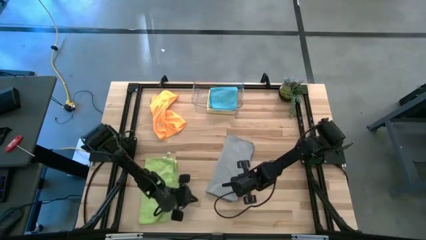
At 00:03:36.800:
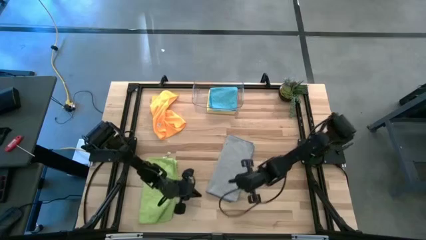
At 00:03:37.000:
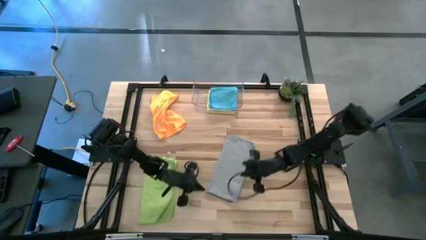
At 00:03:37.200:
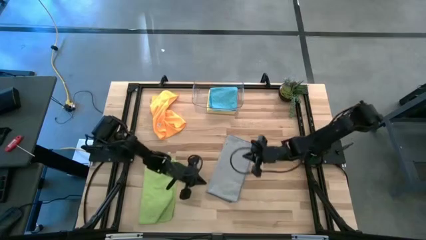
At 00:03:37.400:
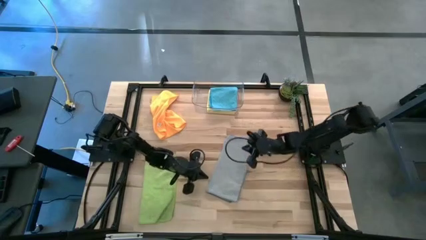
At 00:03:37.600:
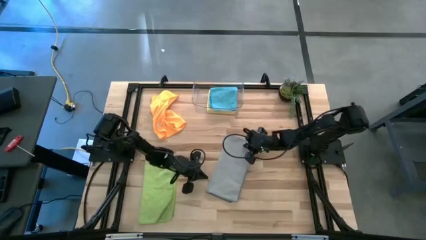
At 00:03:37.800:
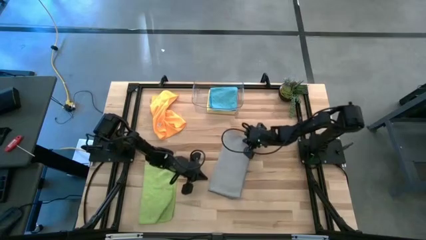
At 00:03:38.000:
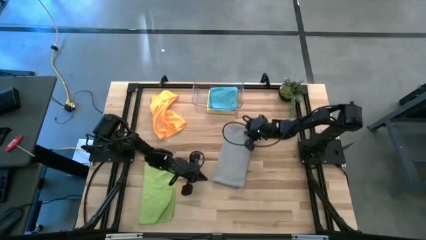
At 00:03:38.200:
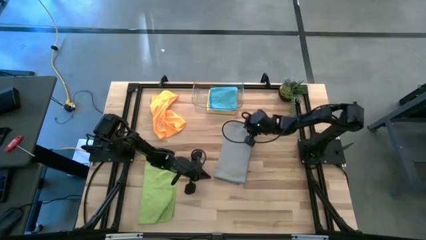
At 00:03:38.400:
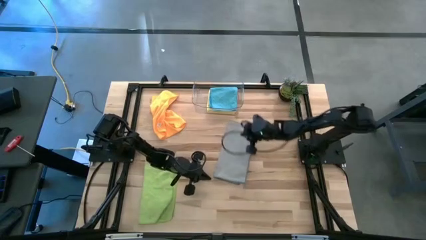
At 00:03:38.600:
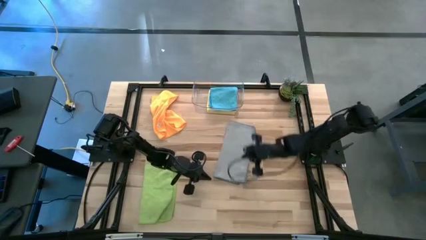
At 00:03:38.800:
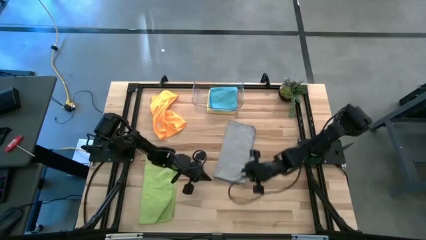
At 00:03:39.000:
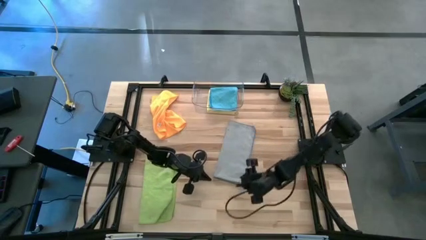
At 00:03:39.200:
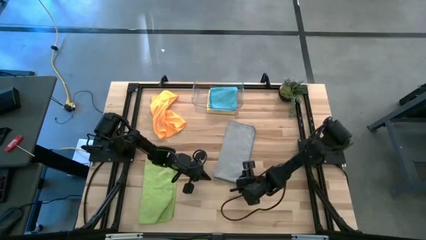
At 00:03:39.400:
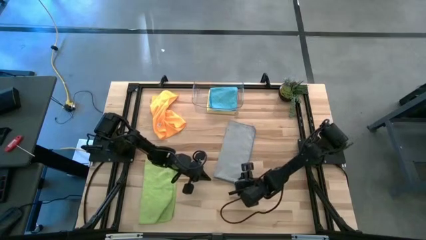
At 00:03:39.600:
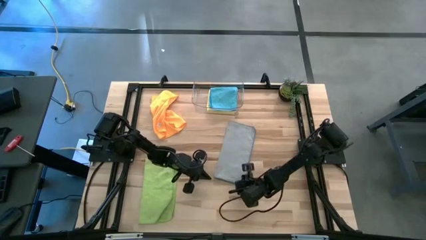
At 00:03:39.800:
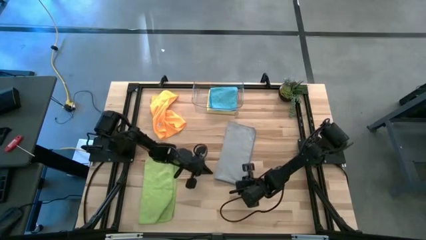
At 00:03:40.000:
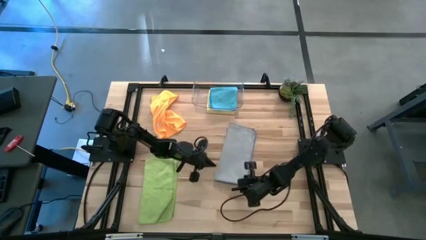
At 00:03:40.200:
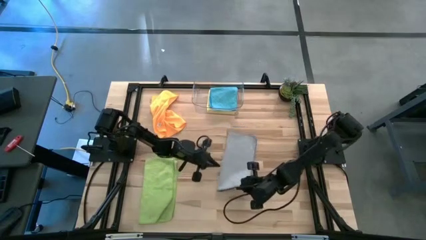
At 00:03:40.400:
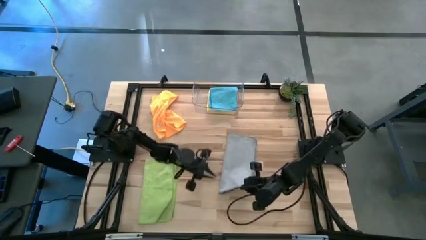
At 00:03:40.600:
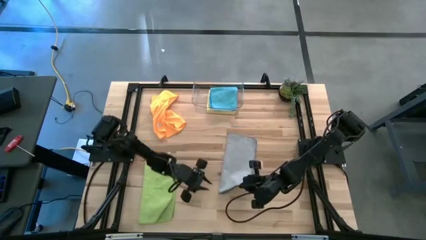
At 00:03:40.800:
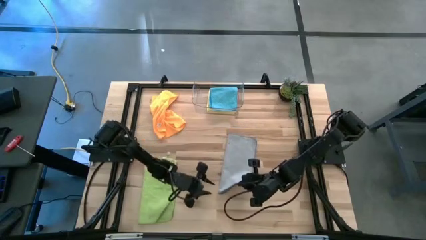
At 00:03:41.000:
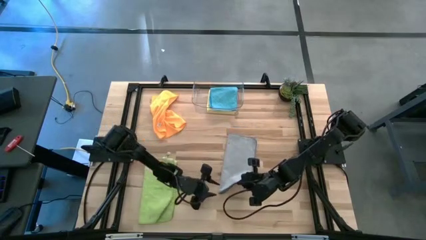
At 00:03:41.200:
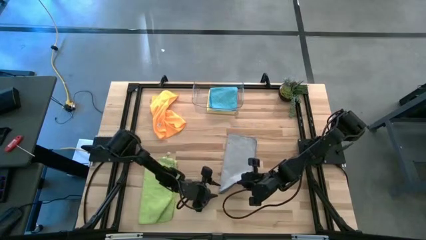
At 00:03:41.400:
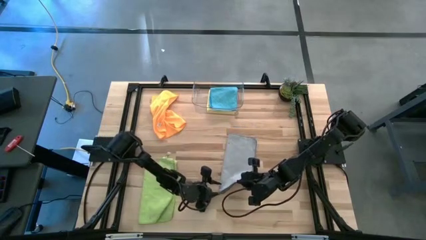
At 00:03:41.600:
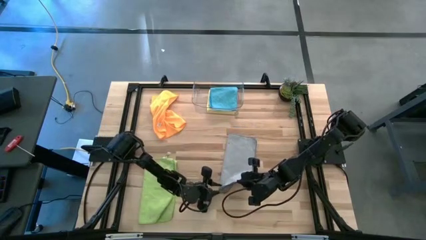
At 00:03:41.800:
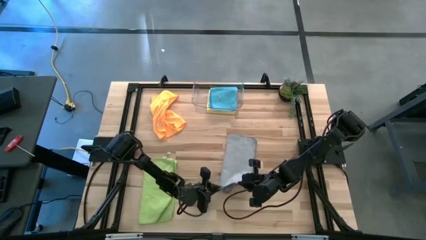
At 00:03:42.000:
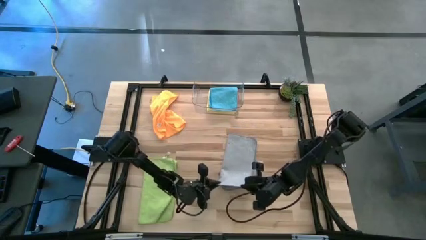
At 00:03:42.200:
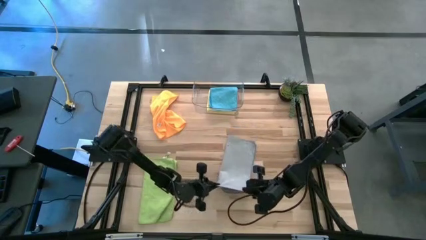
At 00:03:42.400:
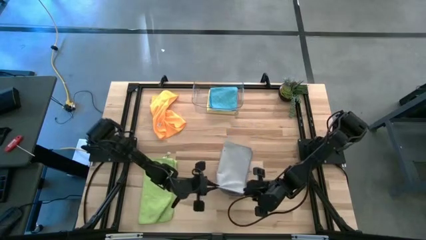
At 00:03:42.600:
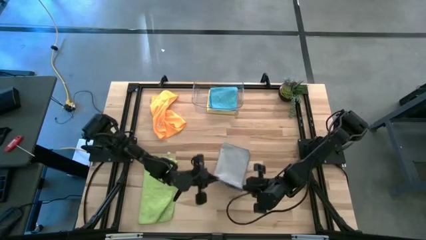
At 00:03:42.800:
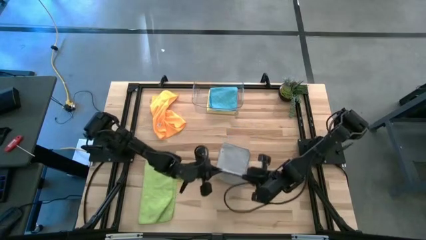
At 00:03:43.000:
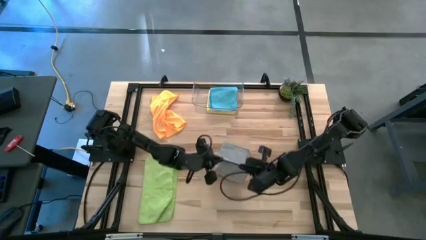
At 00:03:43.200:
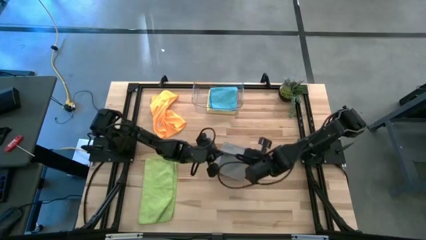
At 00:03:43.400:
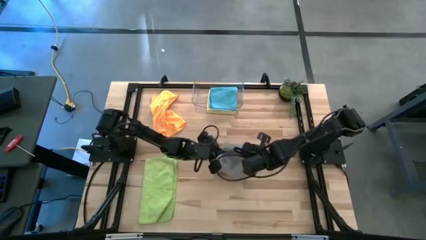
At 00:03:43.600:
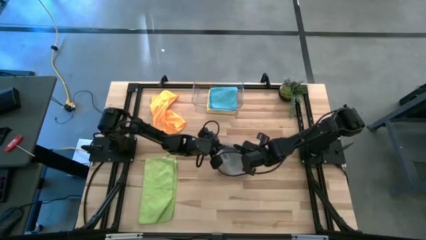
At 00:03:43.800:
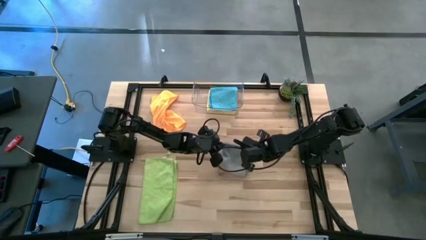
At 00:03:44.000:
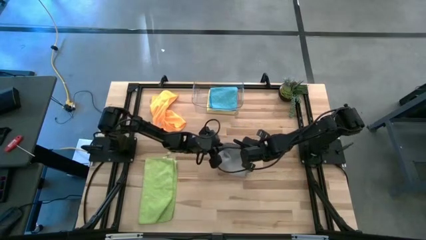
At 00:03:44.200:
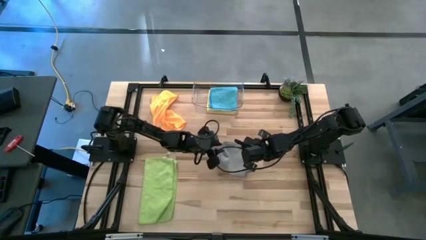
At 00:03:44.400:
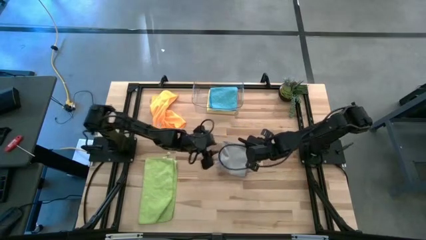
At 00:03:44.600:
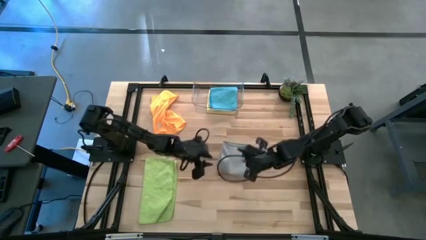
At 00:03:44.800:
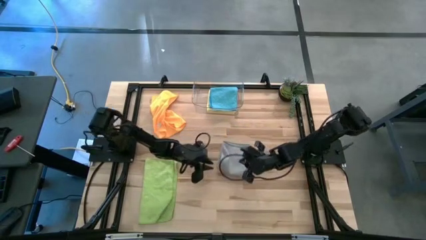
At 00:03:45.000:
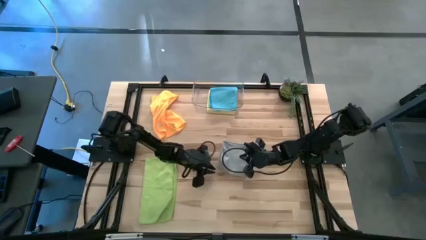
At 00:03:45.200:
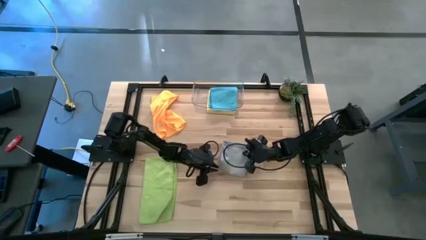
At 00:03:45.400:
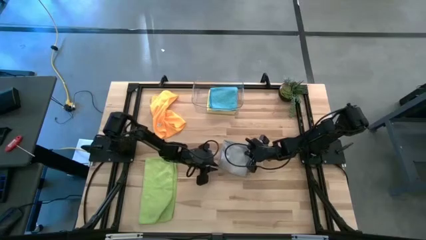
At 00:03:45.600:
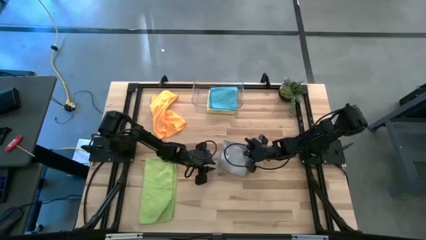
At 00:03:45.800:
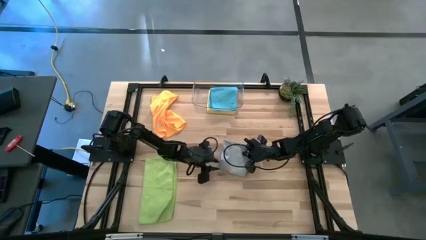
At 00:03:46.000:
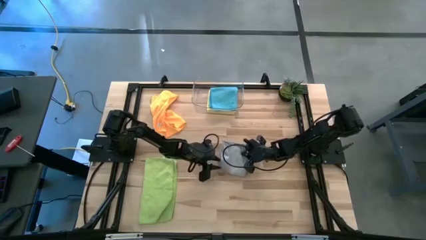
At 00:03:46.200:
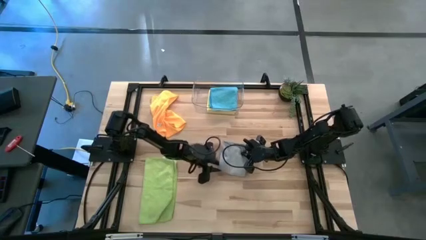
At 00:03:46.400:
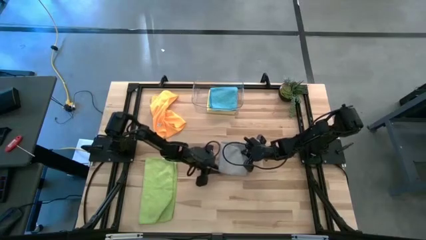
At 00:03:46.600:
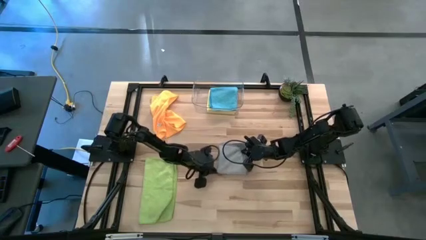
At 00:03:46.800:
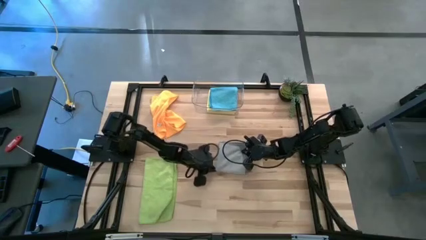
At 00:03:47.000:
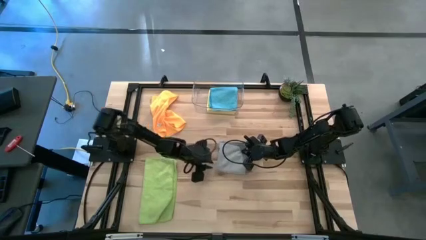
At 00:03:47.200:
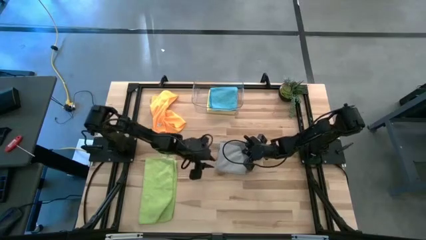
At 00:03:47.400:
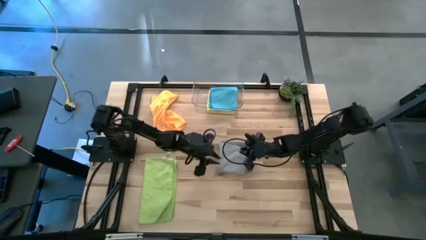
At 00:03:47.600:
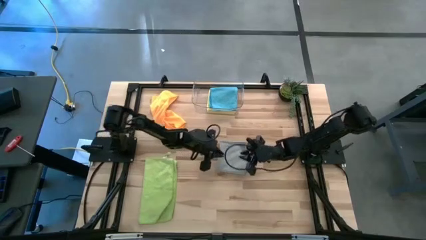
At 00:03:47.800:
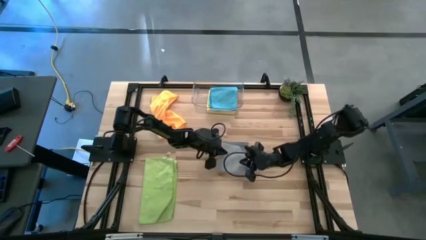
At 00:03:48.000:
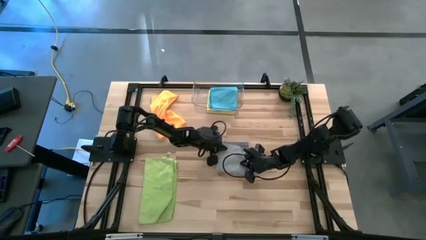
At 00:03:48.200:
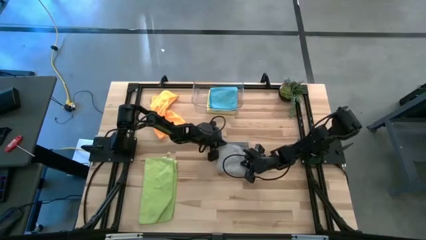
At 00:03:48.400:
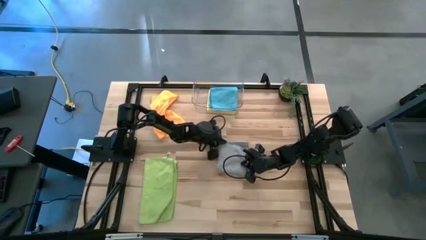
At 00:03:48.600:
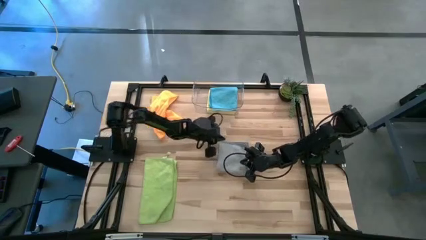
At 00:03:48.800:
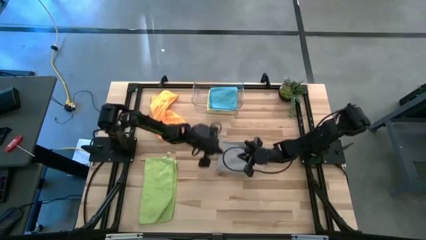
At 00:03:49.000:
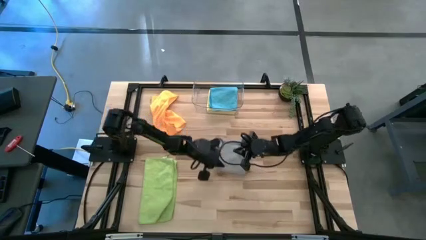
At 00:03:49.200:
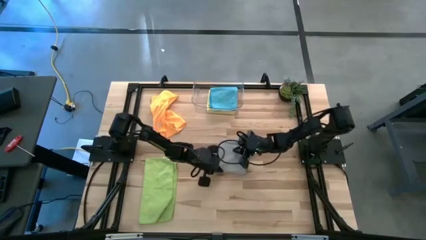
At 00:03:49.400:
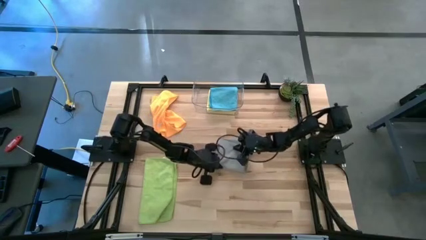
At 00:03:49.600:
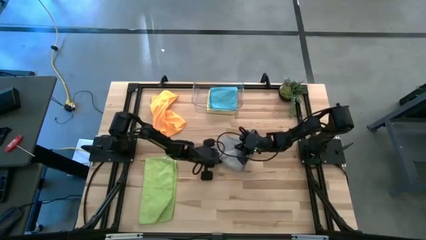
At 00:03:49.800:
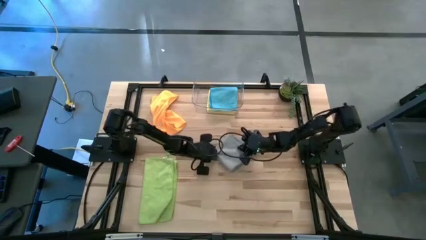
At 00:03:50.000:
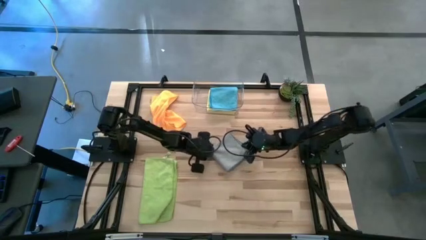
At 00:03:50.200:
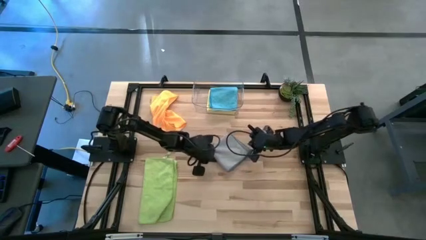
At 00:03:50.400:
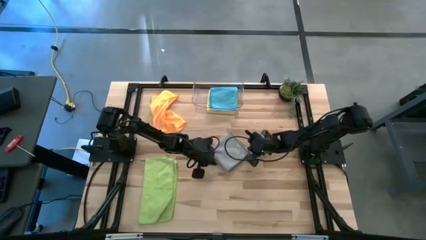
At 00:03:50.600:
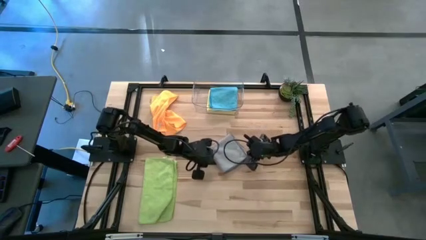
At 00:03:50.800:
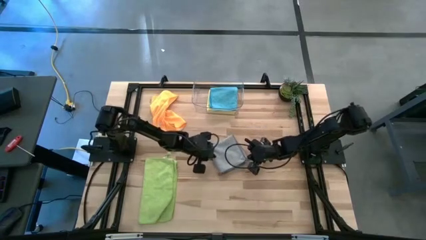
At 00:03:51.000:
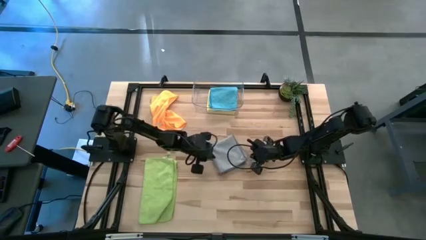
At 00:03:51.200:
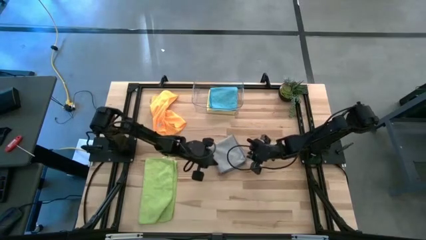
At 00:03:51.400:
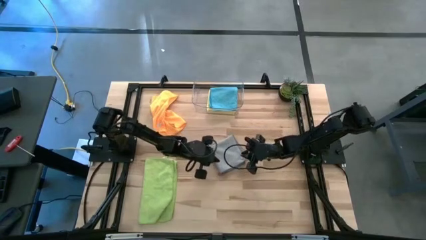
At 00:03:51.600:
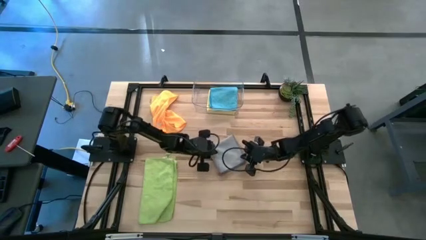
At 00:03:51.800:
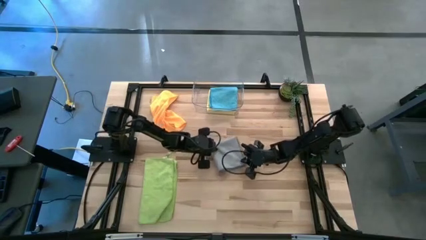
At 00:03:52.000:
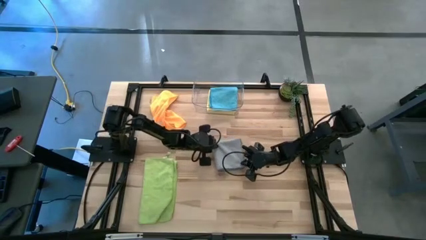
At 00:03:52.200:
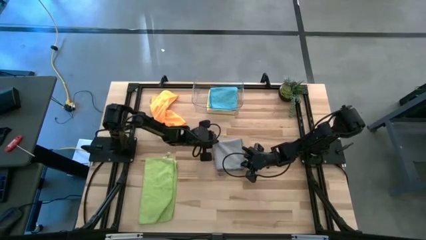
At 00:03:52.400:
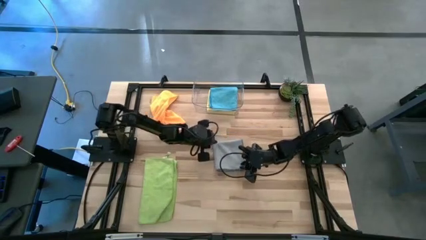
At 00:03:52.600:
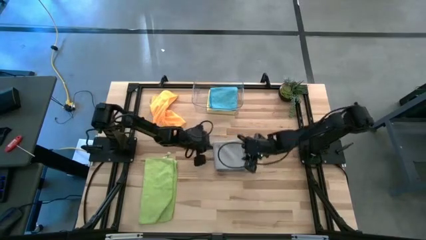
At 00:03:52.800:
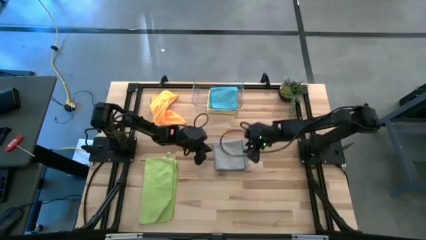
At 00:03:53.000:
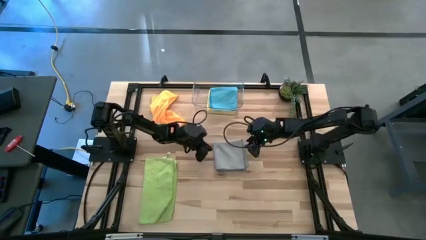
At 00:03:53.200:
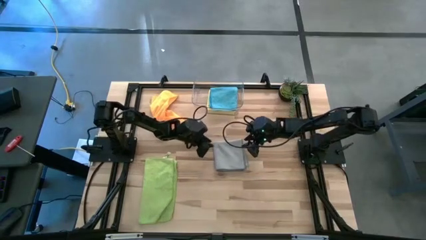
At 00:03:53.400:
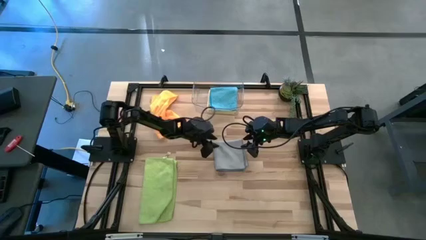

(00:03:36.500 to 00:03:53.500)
Task: Fold microfiber towels
Fold the gray towel on the table
